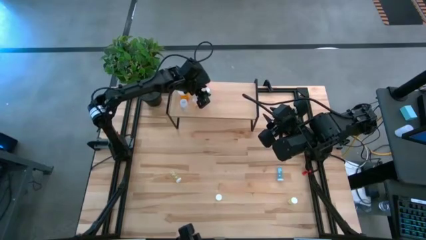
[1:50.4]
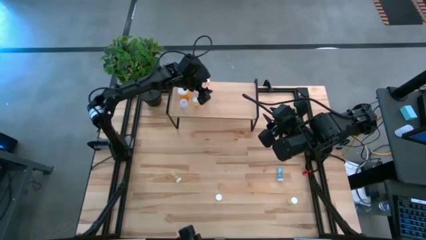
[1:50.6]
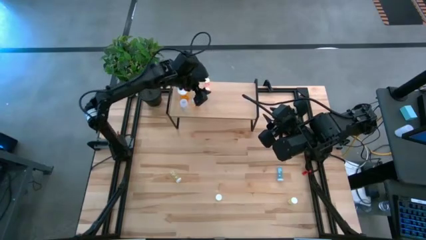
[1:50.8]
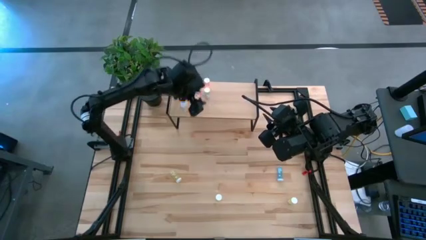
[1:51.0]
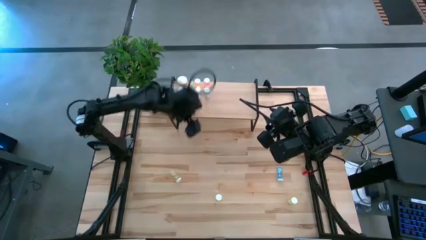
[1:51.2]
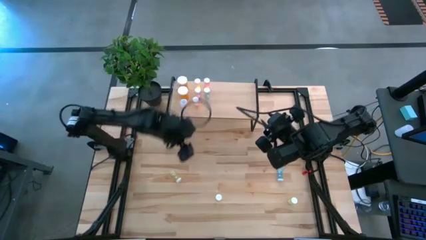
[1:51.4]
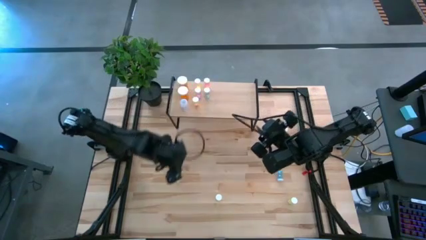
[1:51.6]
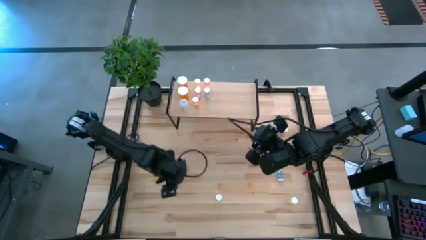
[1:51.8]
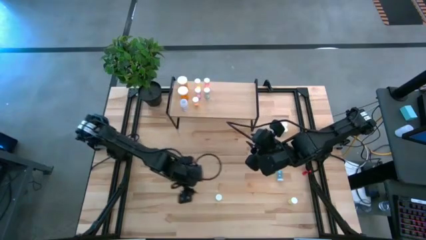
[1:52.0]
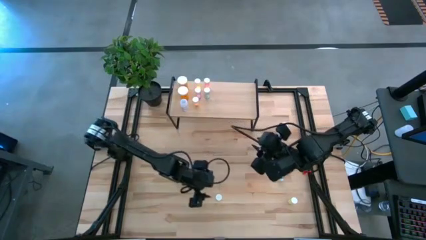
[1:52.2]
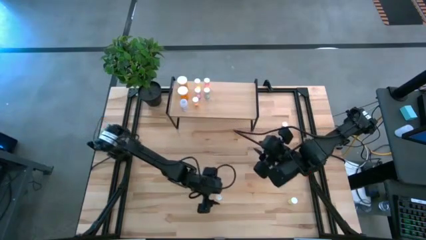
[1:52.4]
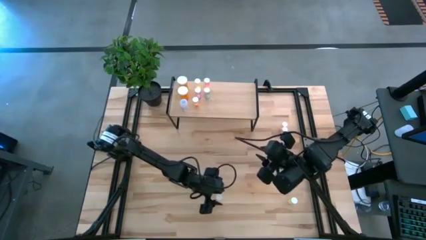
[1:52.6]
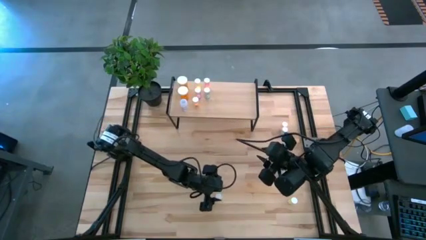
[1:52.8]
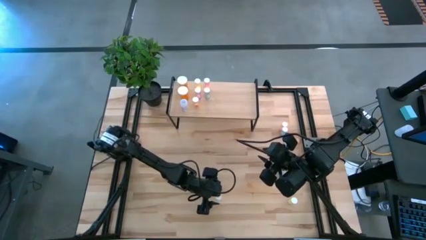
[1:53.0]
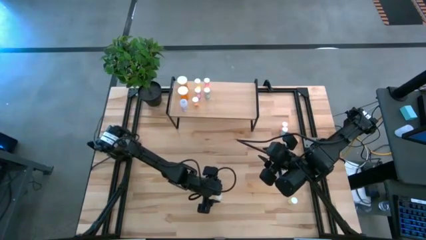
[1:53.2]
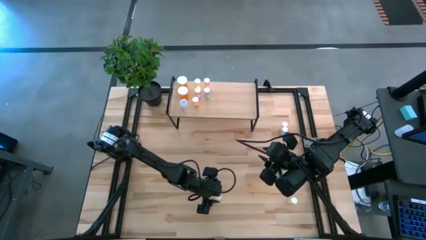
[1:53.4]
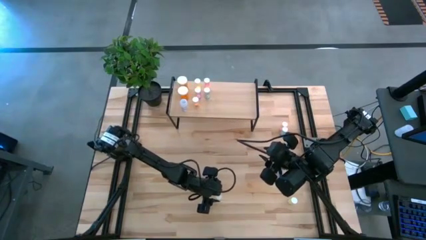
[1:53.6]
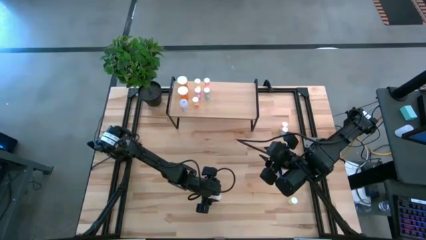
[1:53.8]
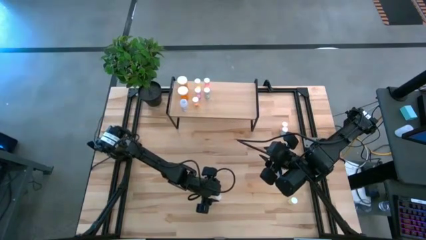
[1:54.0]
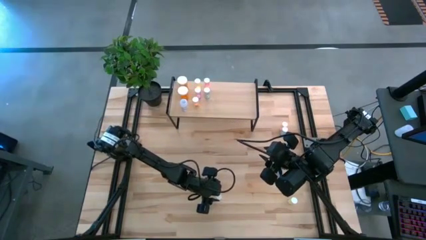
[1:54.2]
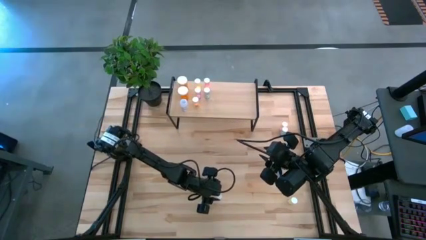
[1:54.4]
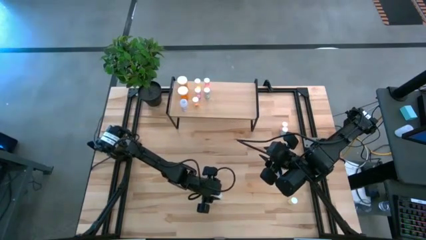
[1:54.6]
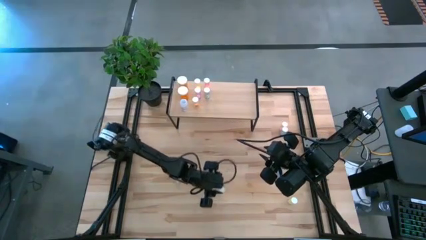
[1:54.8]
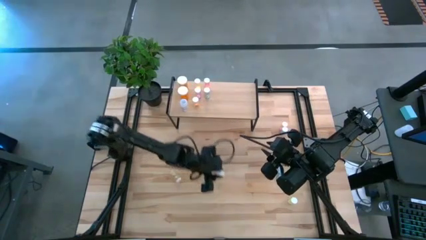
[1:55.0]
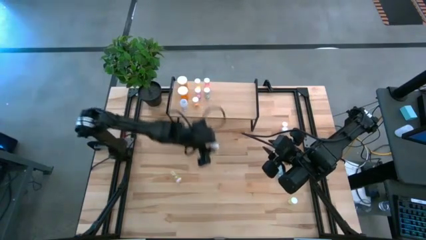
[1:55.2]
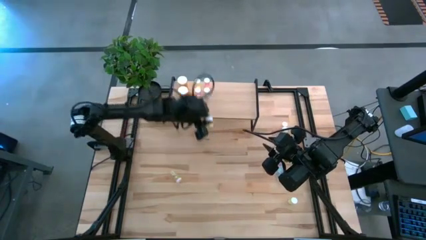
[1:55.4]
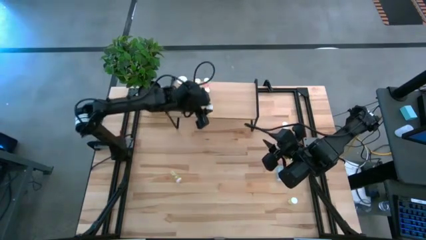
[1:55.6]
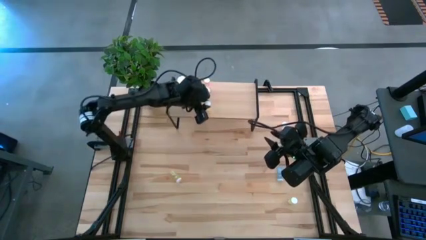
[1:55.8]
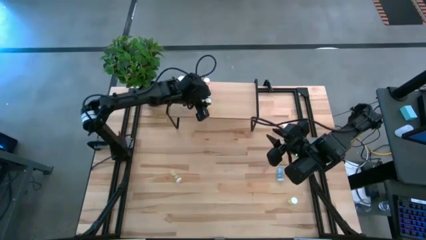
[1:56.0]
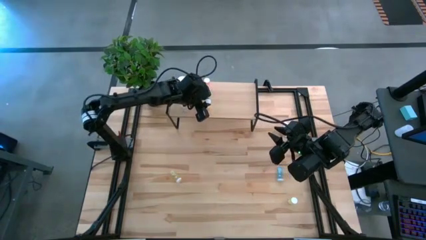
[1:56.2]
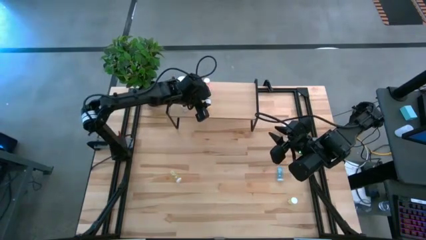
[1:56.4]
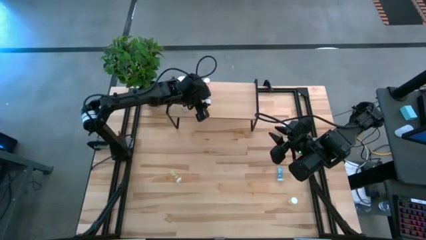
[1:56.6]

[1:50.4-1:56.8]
Task: Pick and place medicine bottles onto shelf by color
Put the yellow pill bottle on the shelf

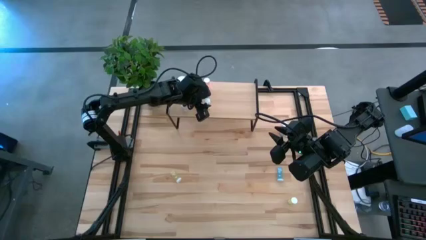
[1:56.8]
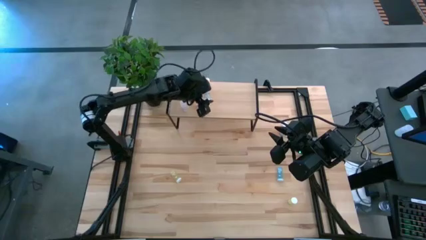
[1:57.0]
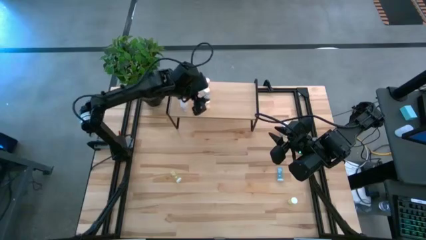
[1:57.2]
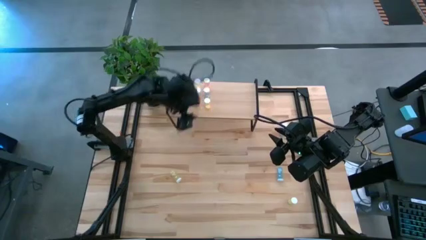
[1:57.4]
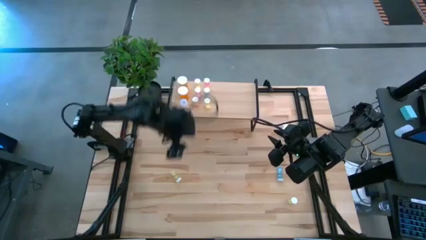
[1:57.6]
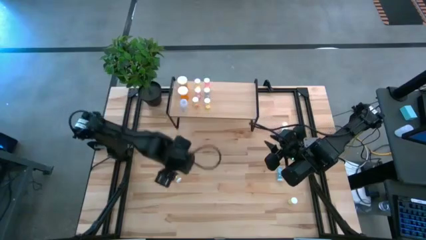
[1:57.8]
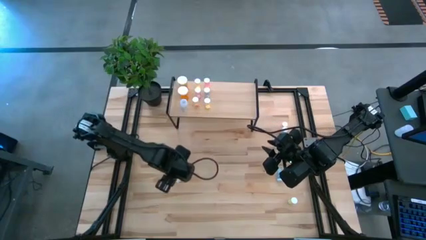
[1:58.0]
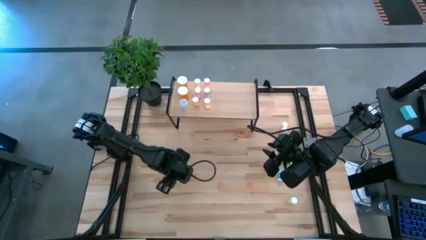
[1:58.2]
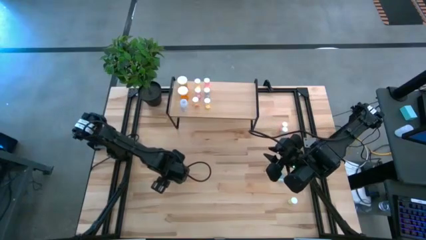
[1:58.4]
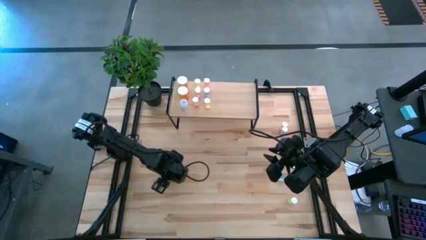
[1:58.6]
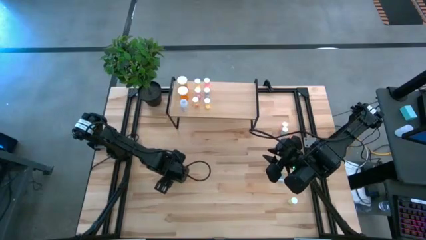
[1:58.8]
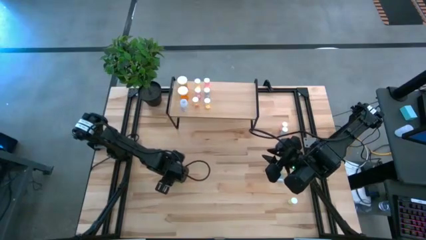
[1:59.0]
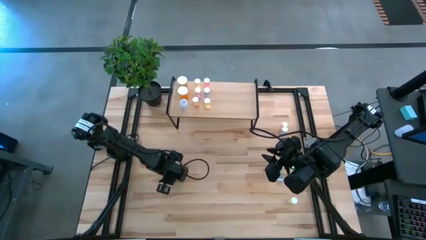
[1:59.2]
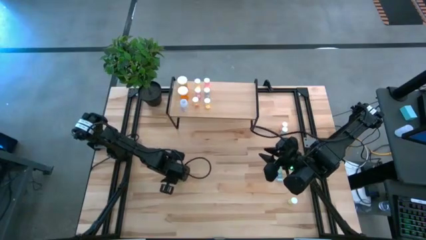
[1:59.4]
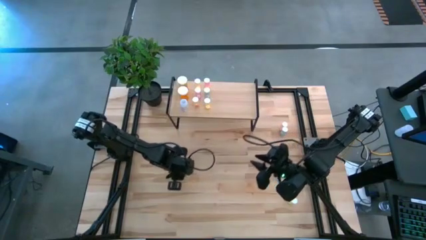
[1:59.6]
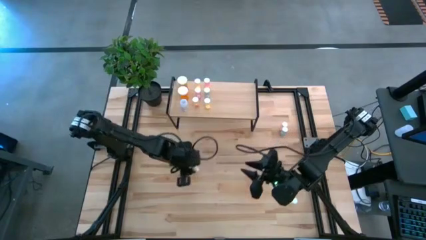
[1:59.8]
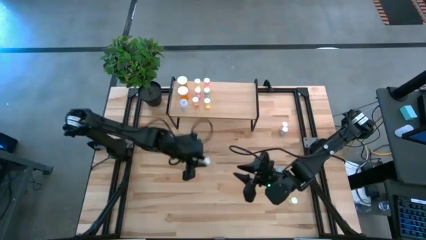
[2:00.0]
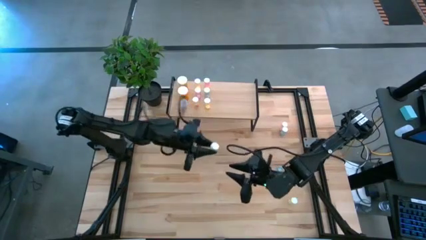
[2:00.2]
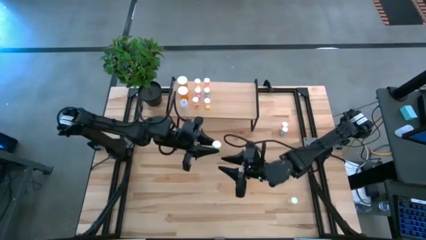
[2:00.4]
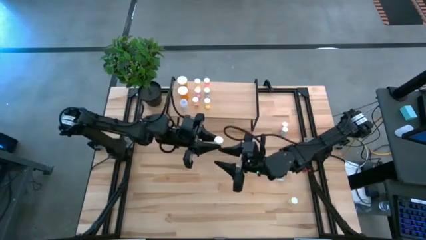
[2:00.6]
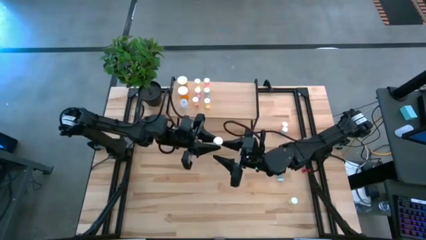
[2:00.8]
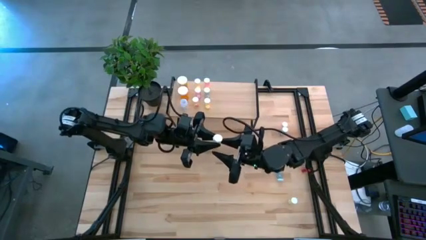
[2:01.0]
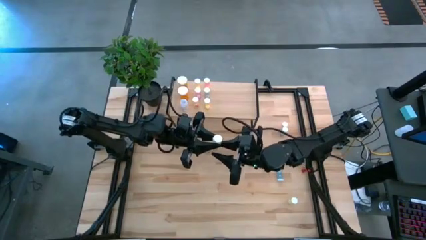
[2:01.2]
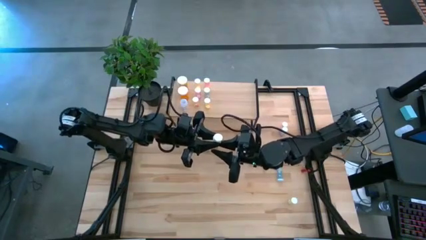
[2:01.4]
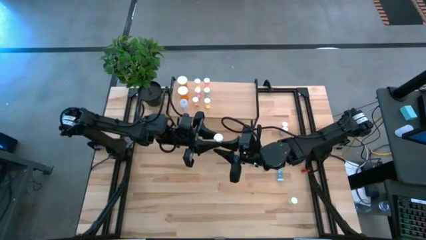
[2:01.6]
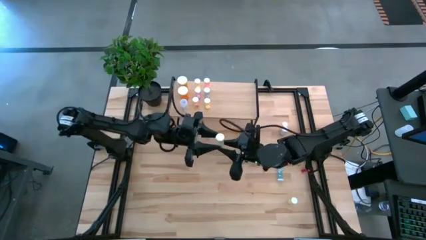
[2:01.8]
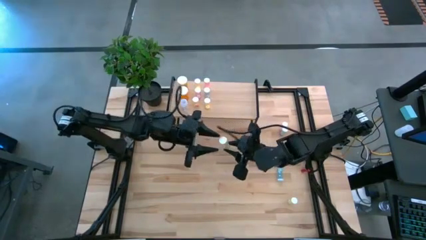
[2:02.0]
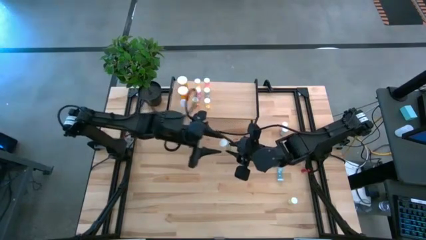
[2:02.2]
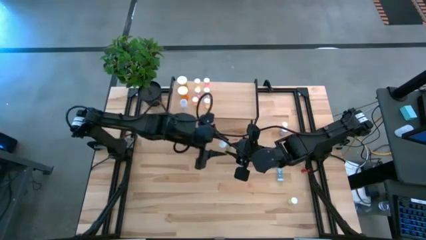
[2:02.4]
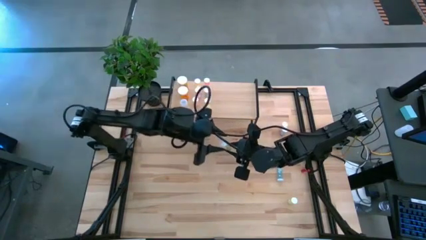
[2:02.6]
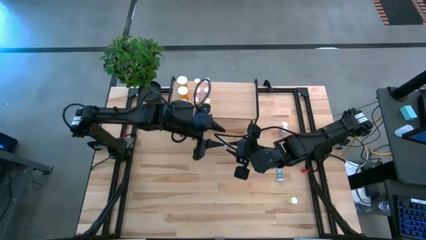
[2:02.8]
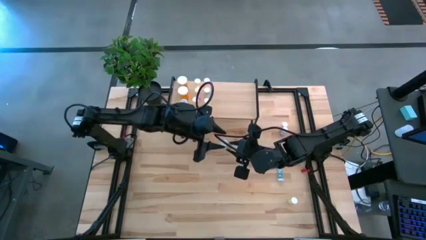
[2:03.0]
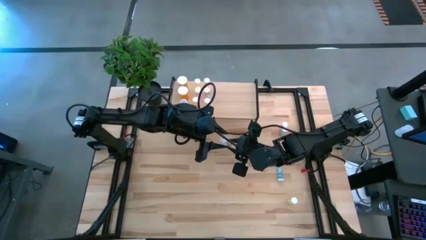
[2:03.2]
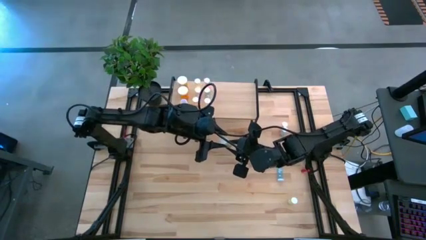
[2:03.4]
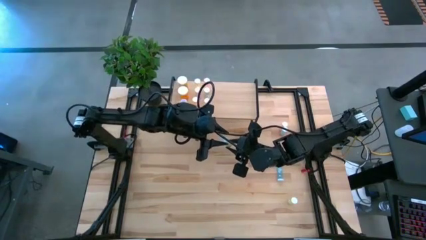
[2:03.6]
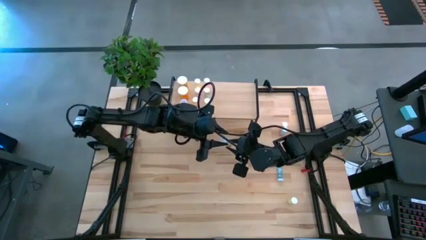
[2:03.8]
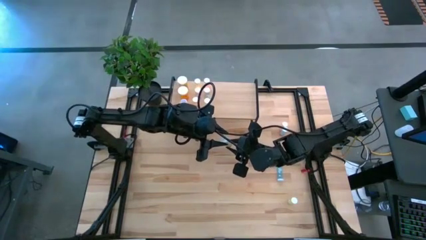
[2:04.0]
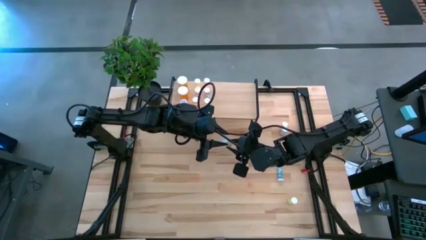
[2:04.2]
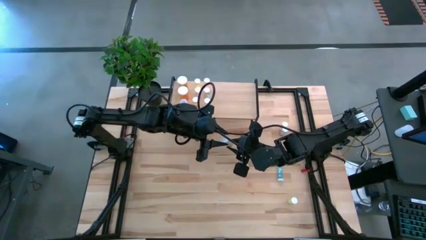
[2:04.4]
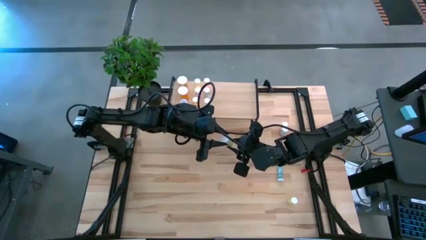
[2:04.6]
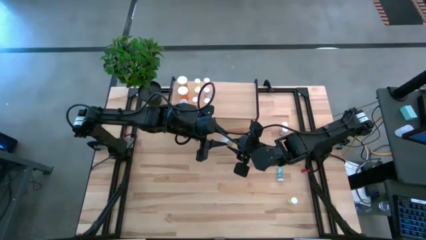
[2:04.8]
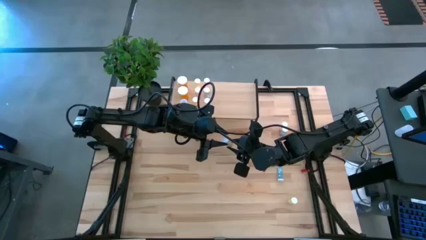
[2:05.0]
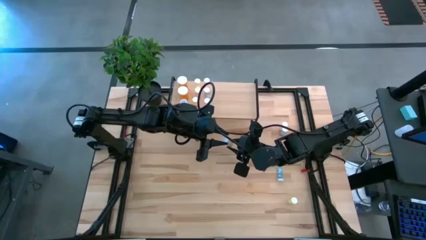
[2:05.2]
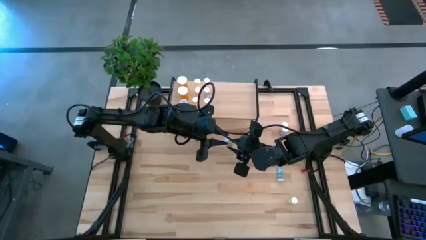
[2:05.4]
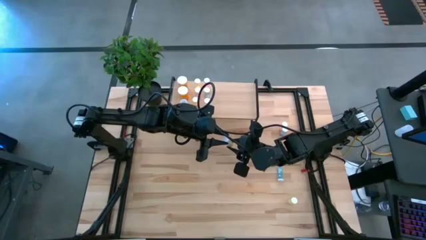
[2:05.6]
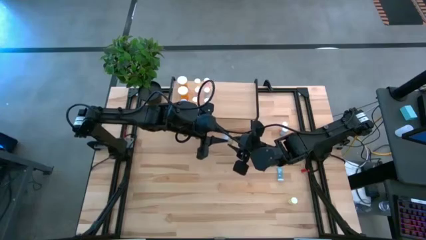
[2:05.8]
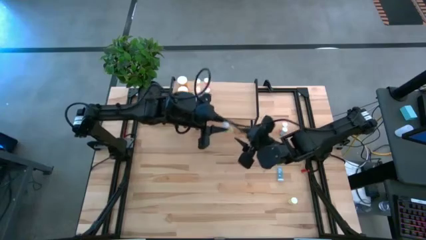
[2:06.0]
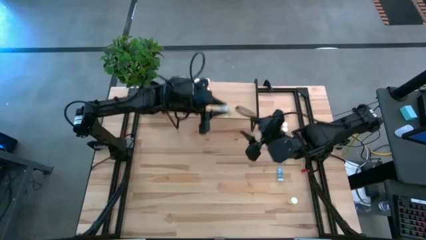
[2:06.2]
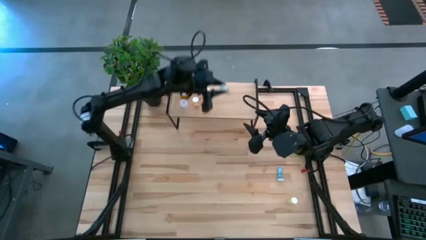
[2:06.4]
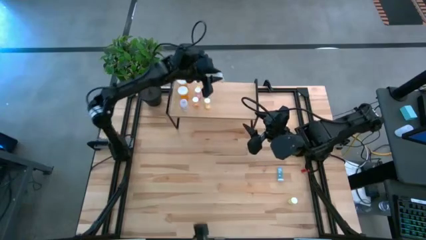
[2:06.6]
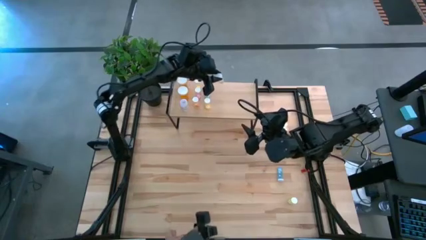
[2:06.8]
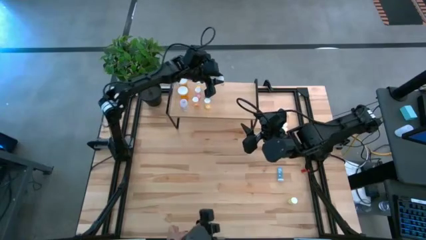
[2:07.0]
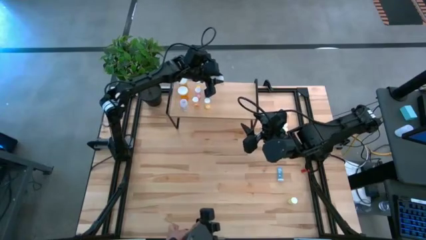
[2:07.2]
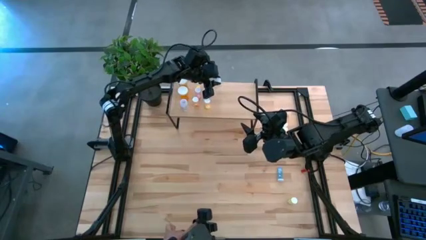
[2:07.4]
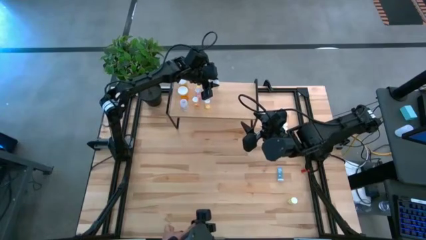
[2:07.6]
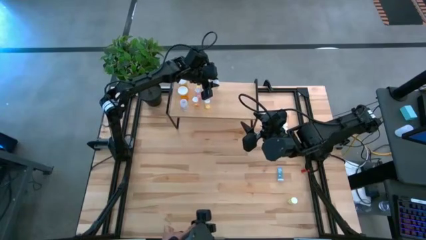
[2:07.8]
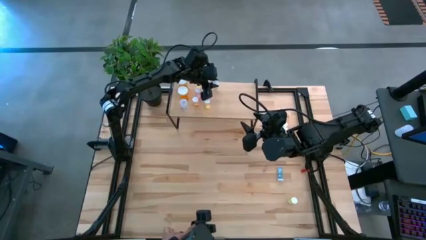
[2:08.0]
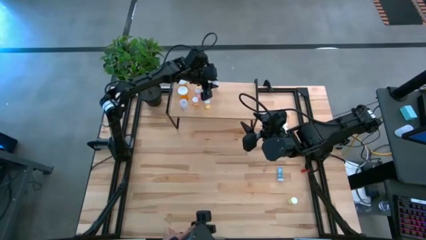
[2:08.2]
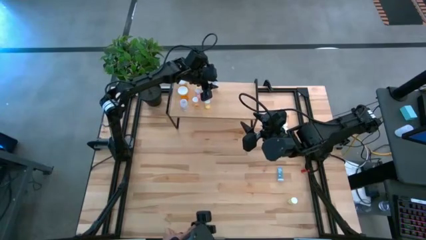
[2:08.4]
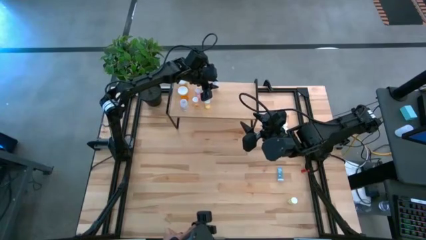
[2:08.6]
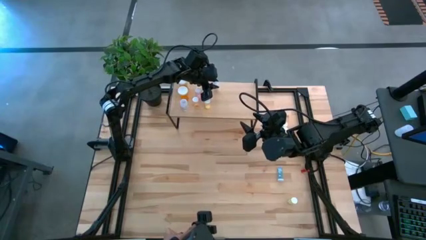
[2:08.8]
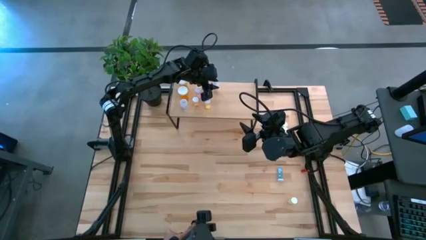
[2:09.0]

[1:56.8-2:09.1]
Put the yellow pill bottle on the shelf
